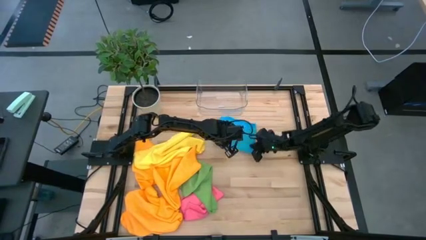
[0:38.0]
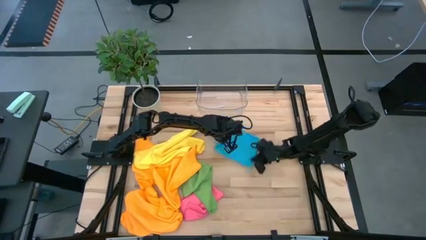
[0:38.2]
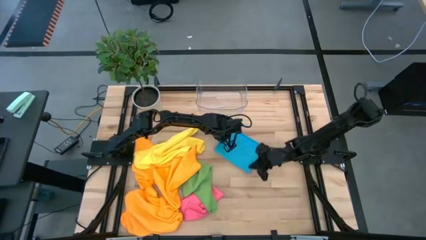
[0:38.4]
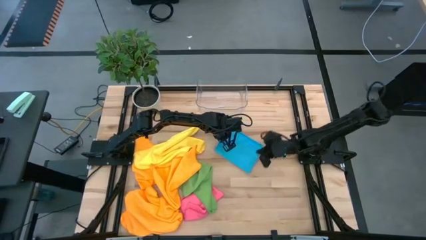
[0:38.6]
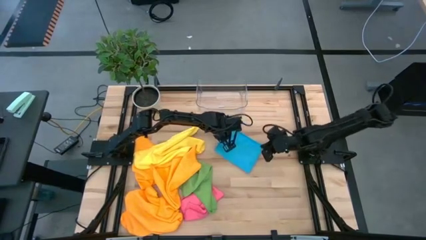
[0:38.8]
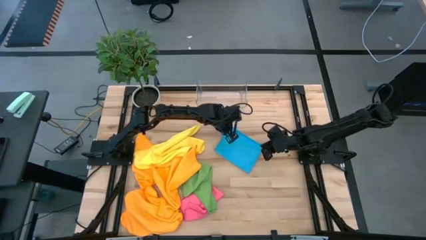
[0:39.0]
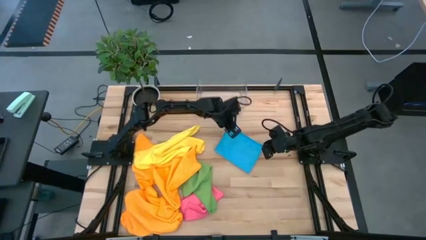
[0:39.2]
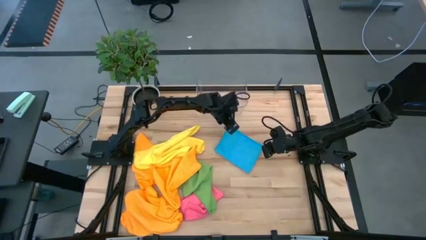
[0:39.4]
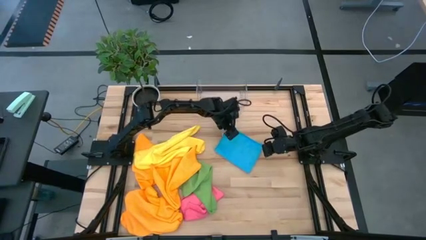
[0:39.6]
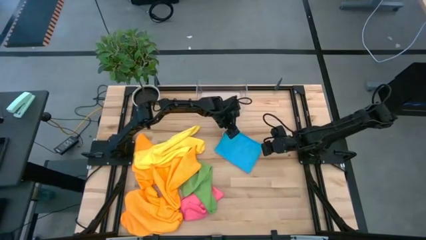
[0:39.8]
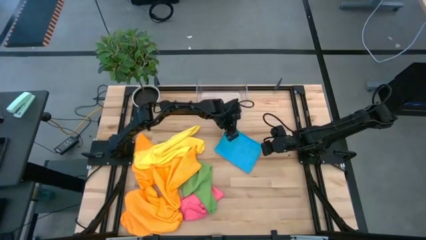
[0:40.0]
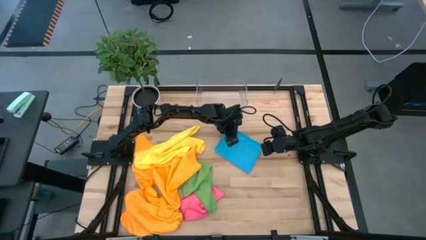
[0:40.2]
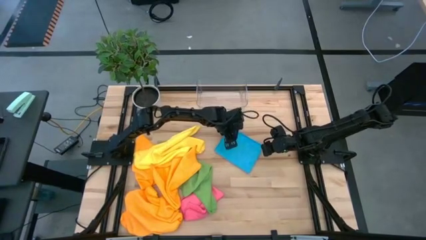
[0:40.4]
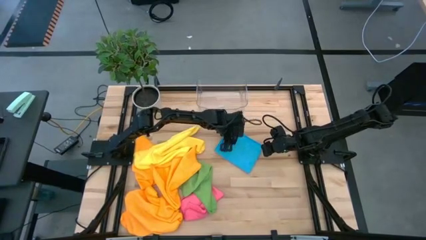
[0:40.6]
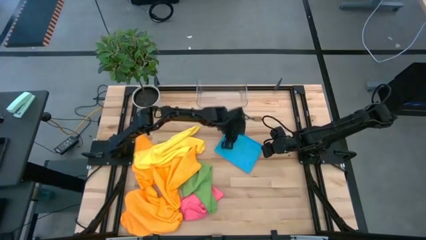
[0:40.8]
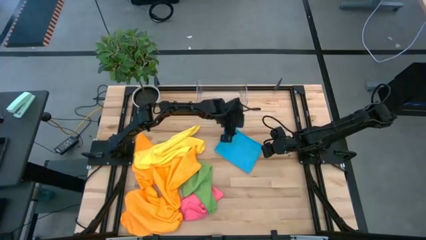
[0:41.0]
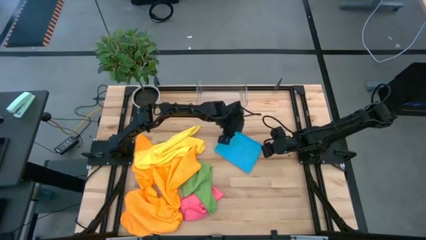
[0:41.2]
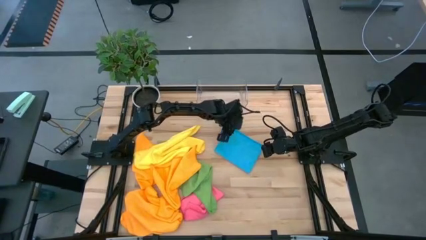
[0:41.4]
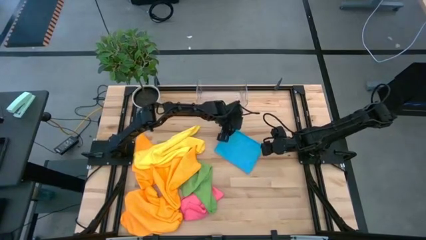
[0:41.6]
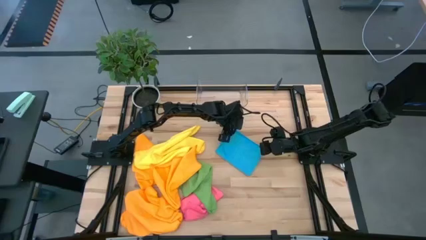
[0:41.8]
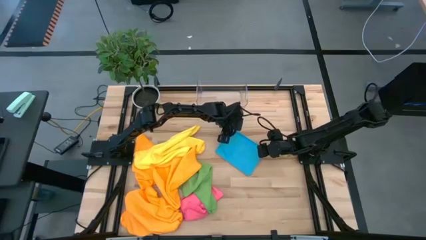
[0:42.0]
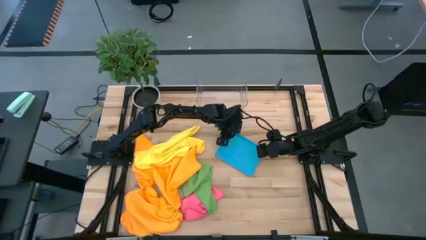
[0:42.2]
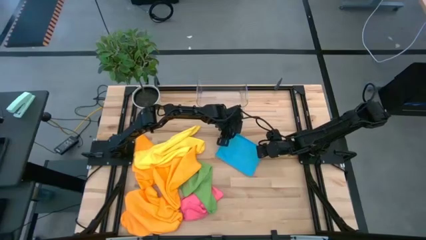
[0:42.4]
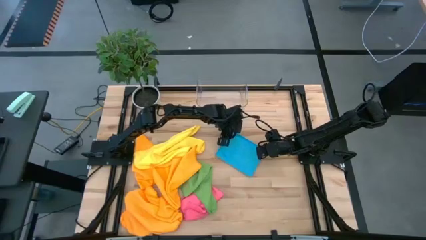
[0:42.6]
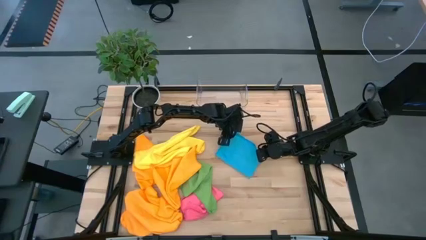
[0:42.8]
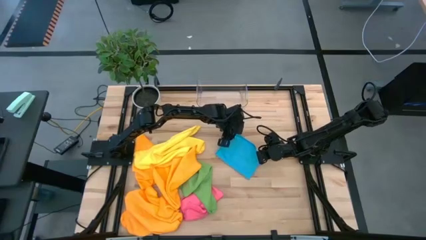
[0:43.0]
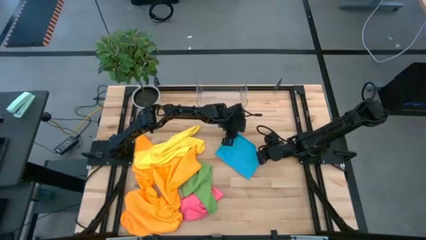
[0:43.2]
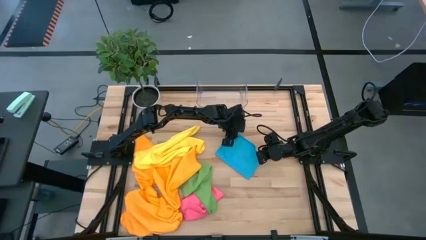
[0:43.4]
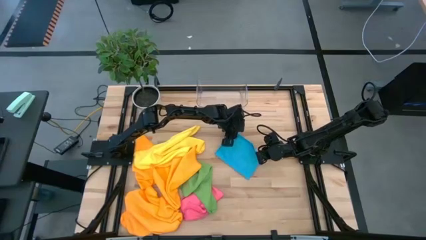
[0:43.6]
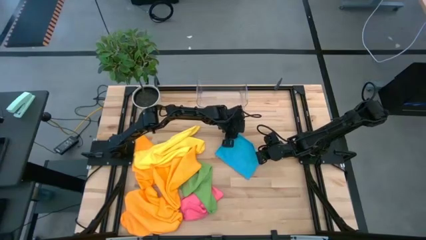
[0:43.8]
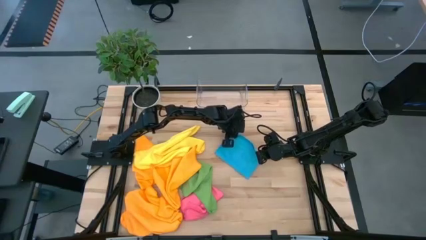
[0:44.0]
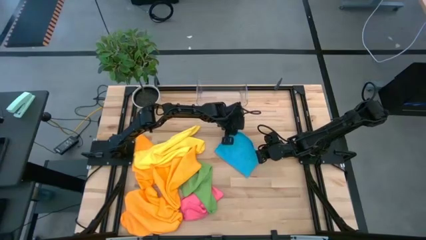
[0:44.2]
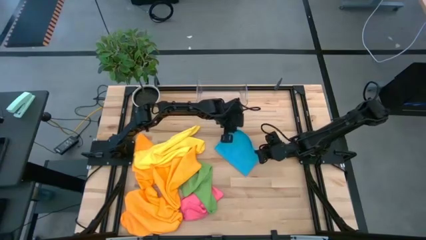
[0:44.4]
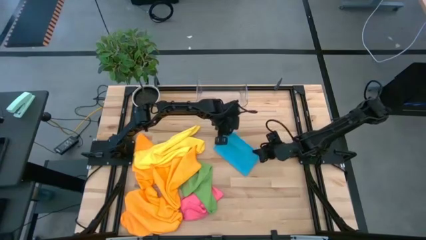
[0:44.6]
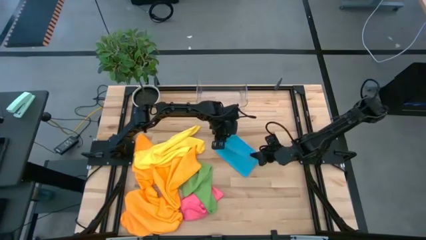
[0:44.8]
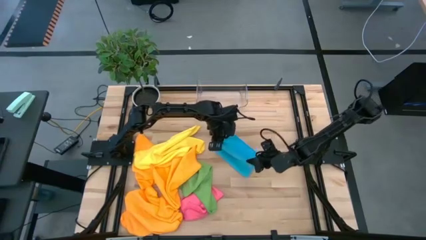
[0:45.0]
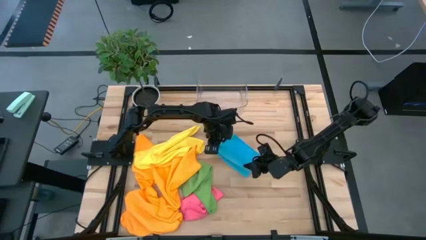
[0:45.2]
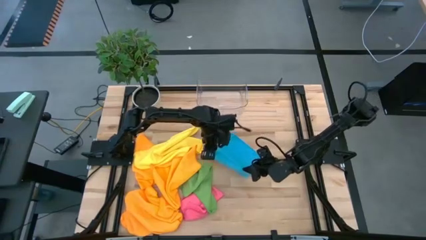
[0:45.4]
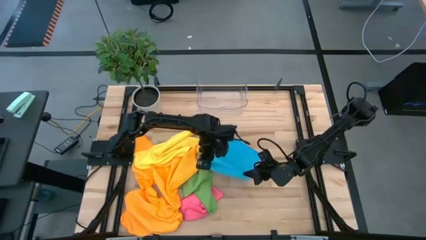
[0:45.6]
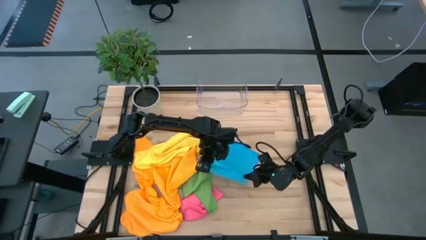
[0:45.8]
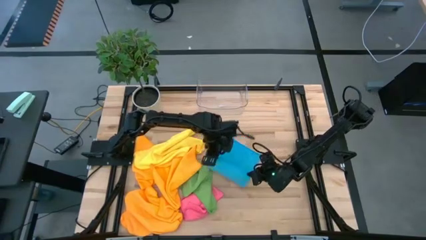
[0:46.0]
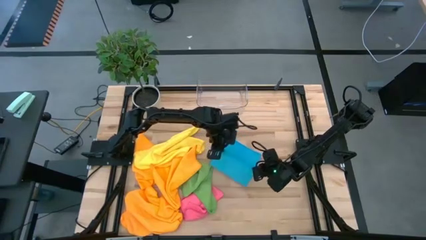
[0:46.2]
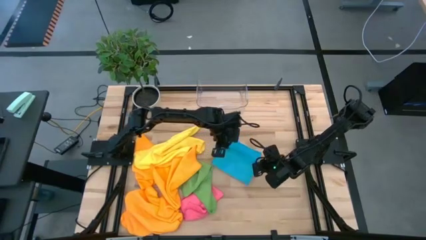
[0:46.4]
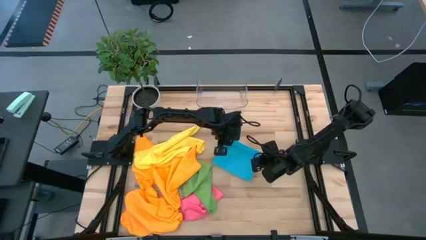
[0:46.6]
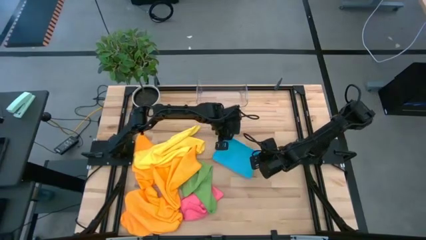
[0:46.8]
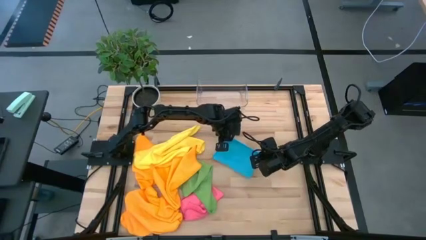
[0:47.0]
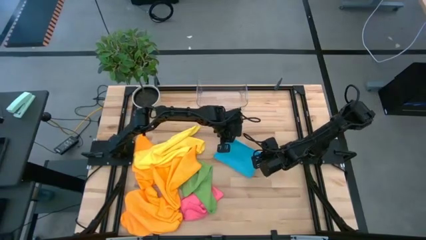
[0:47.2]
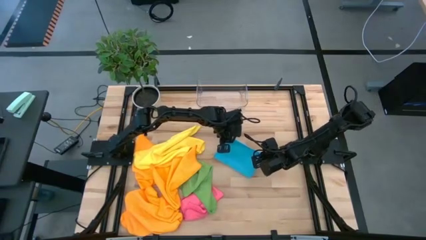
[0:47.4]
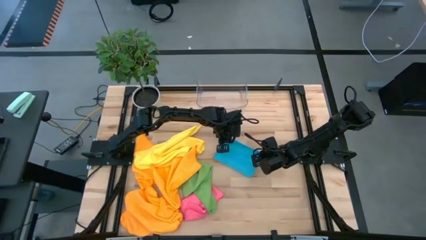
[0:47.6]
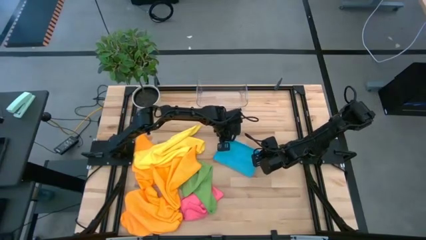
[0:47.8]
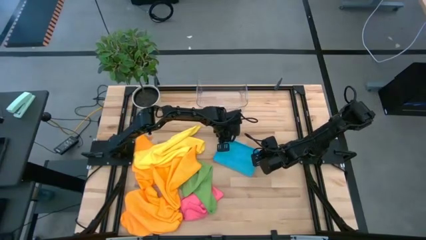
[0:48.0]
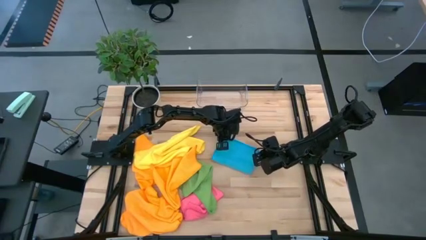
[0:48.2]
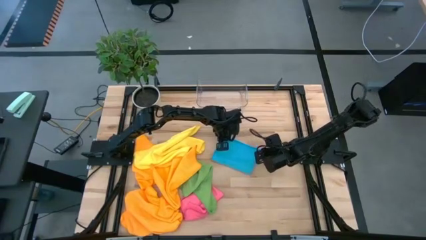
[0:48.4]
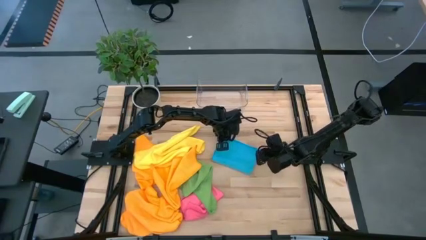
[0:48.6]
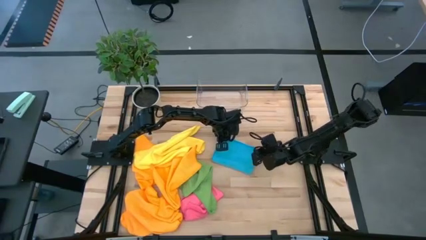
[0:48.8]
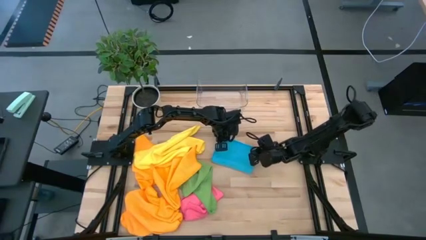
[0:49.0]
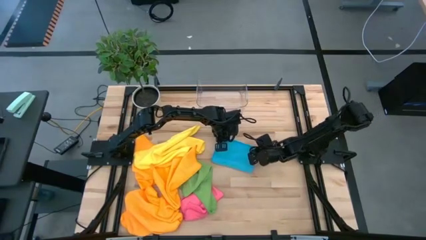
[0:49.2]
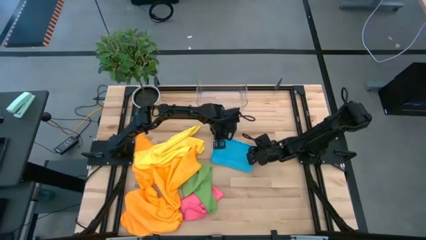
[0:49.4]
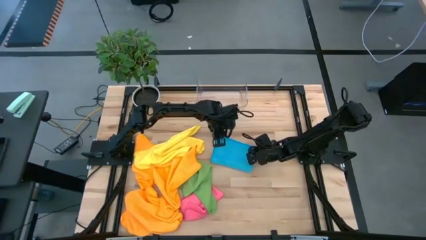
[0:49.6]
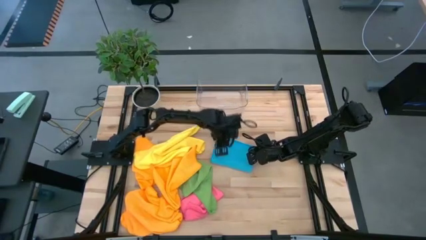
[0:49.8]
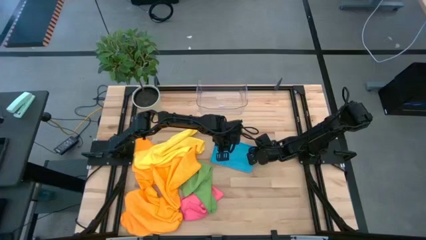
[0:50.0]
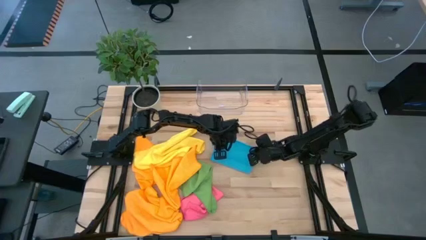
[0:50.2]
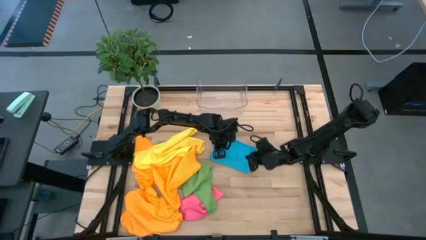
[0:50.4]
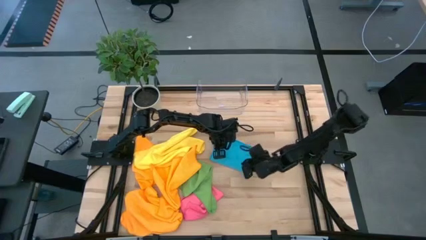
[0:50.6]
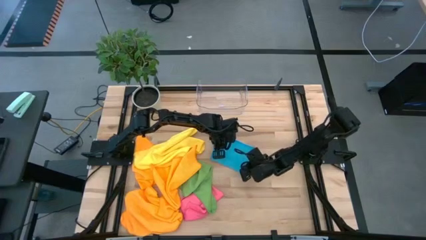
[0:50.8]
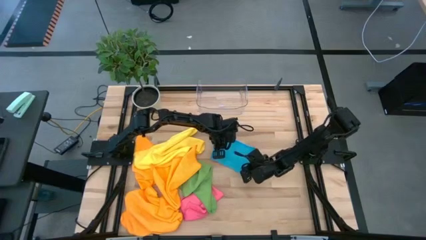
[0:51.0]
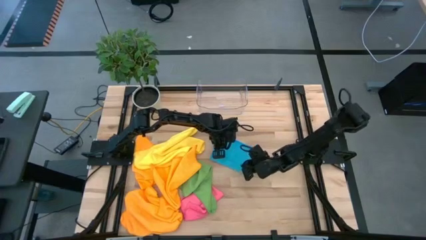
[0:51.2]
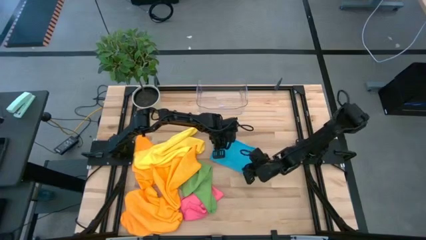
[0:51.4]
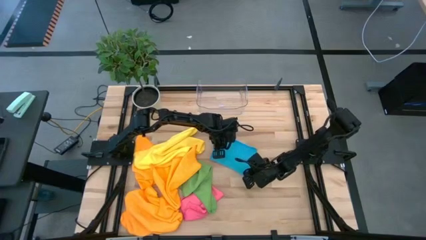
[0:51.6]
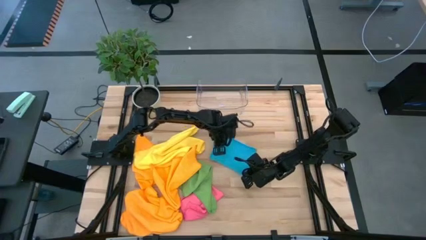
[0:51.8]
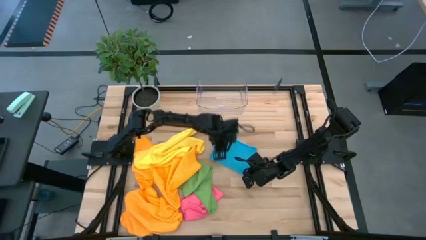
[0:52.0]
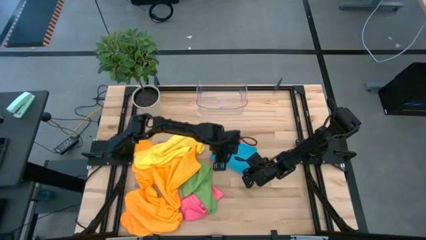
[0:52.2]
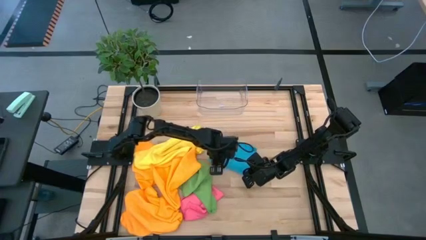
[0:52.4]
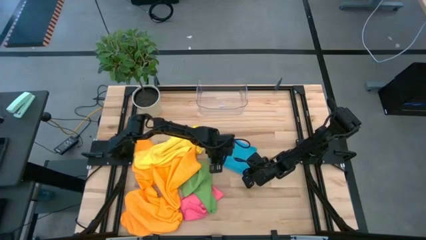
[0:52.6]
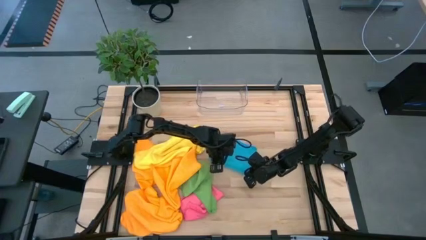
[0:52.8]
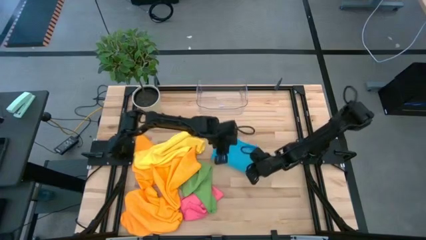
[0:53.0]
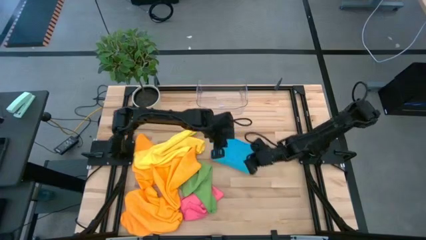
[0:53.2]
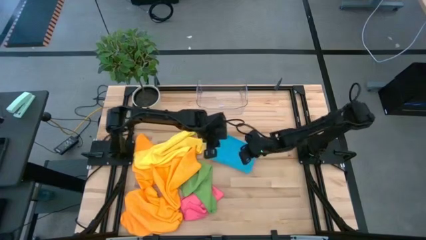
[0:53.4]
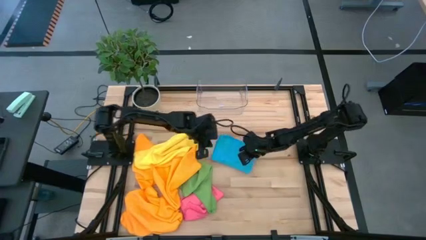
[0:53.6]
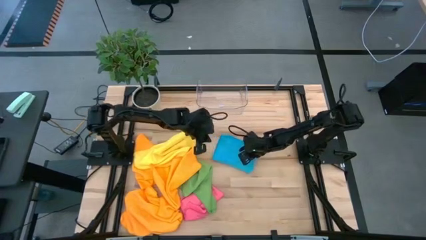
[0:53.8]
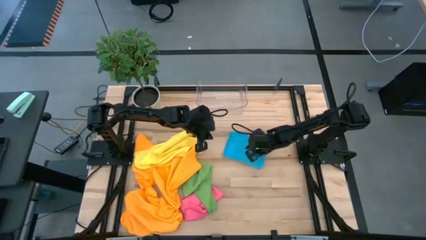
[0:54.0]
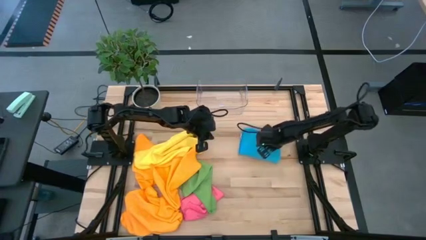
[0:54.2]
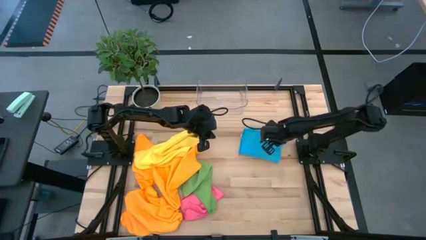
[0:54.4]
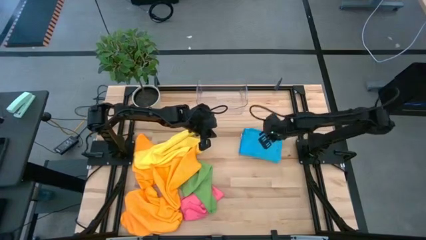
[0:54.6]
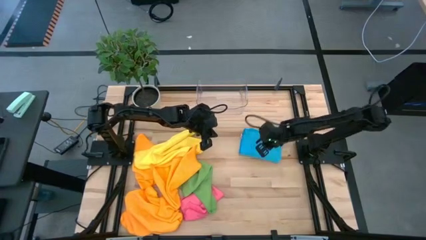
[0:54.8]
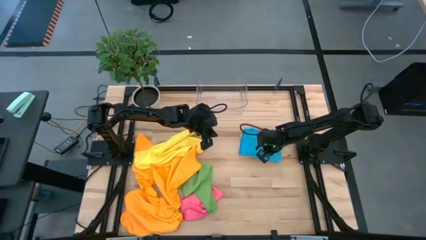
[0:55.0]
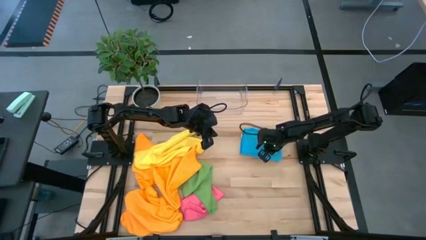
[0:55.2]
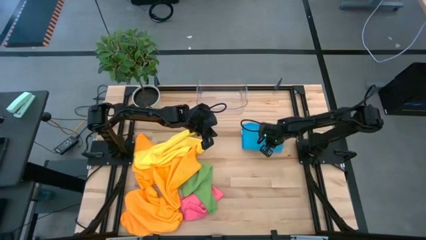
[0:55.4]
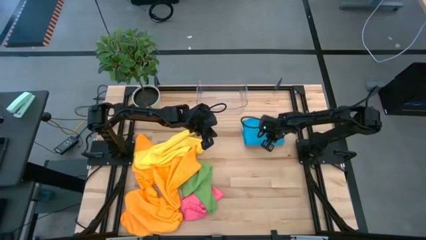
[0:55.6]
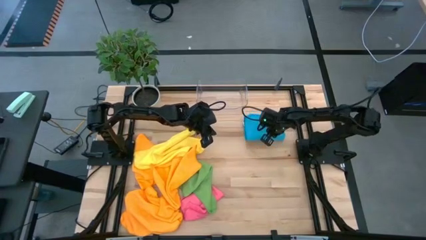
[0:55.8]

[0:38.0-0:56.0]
Task: Fold microfiber towels
Fold the blue towel
